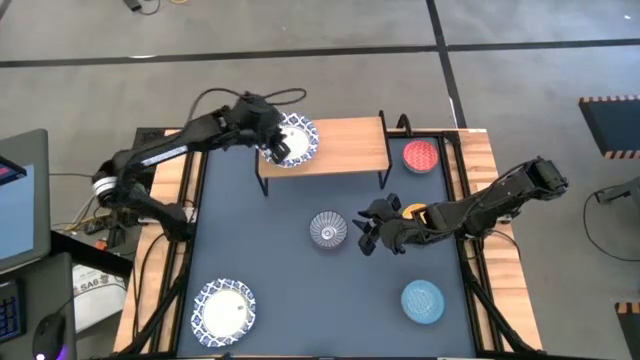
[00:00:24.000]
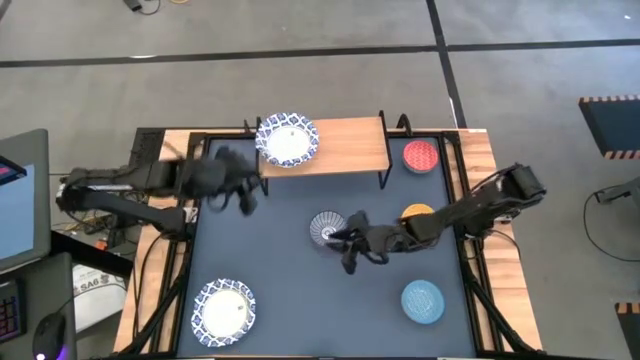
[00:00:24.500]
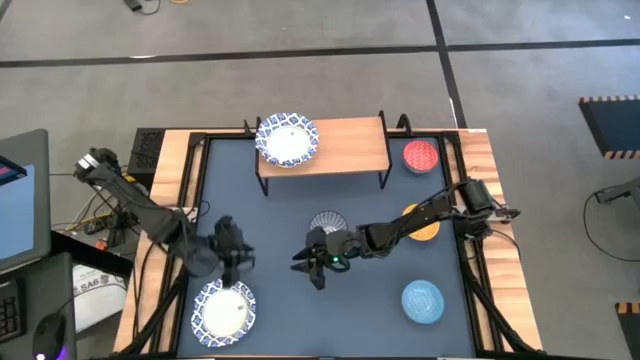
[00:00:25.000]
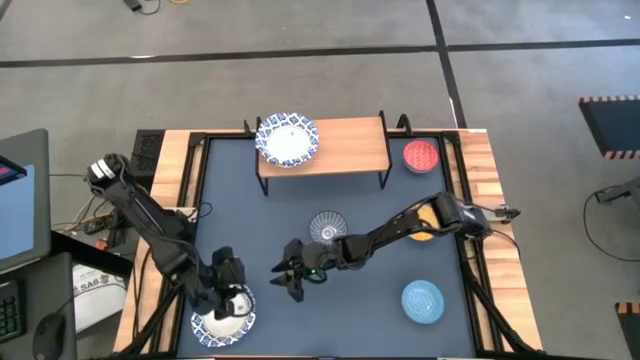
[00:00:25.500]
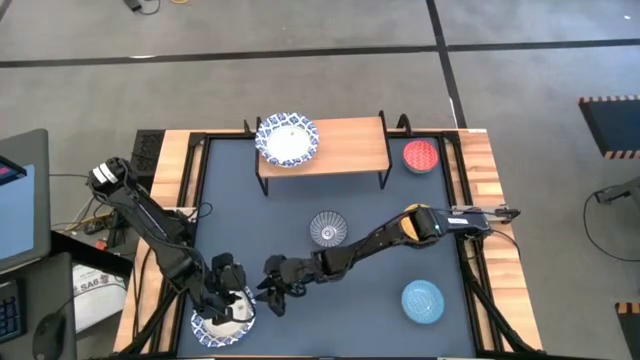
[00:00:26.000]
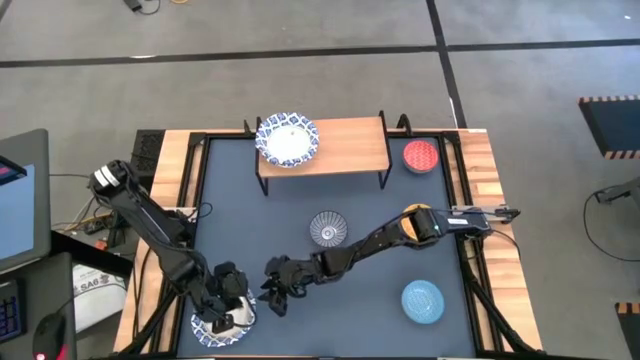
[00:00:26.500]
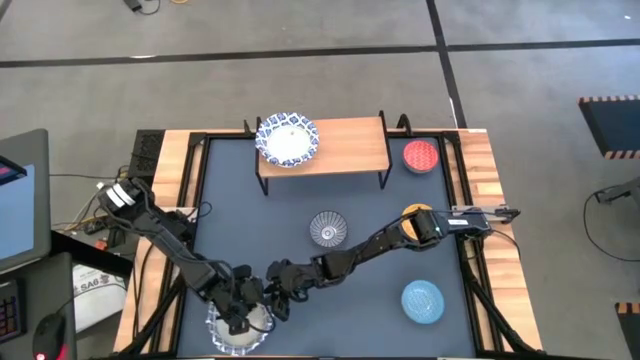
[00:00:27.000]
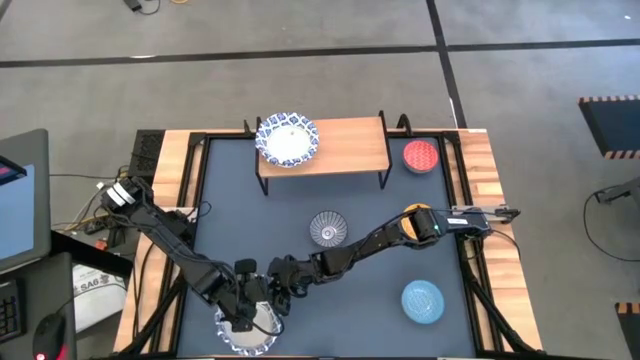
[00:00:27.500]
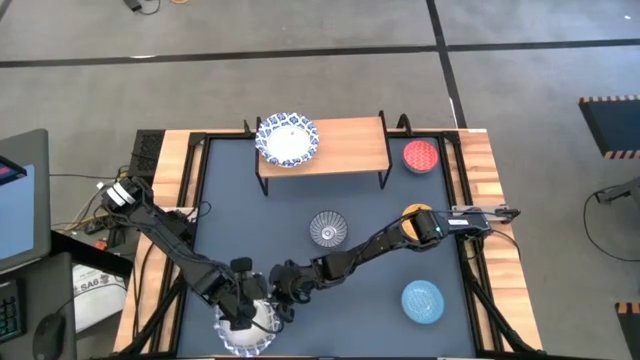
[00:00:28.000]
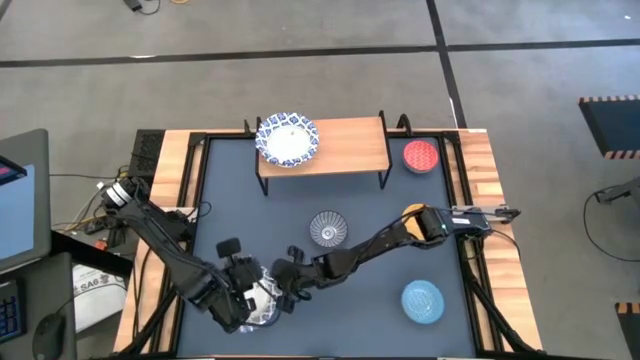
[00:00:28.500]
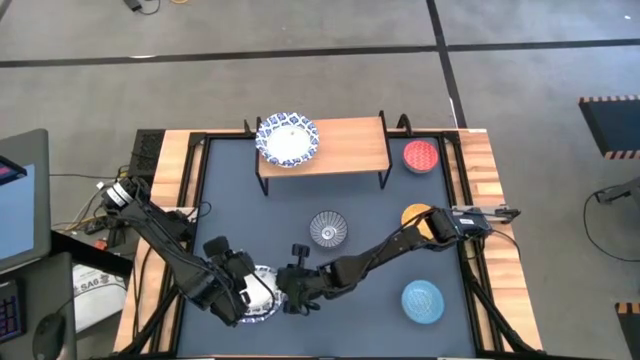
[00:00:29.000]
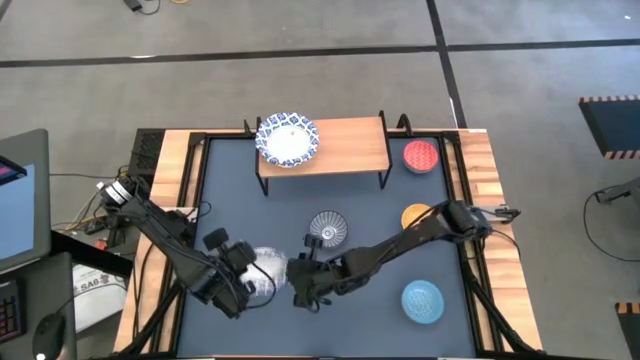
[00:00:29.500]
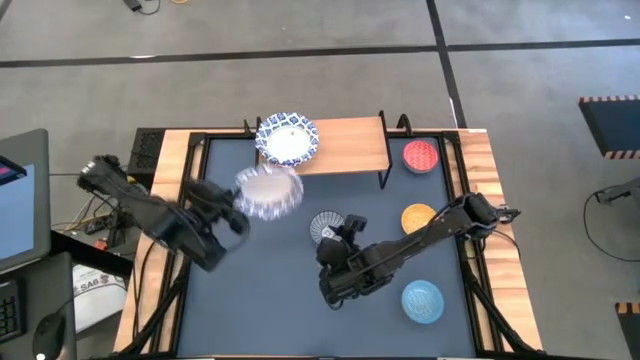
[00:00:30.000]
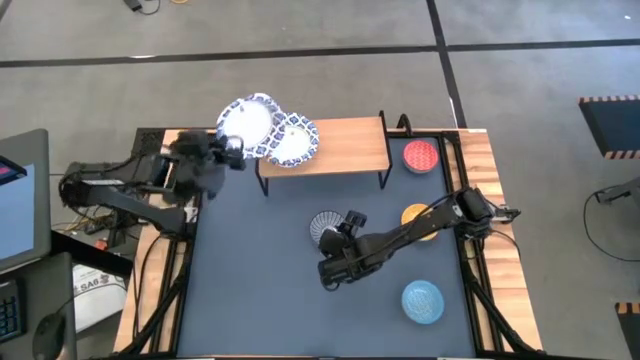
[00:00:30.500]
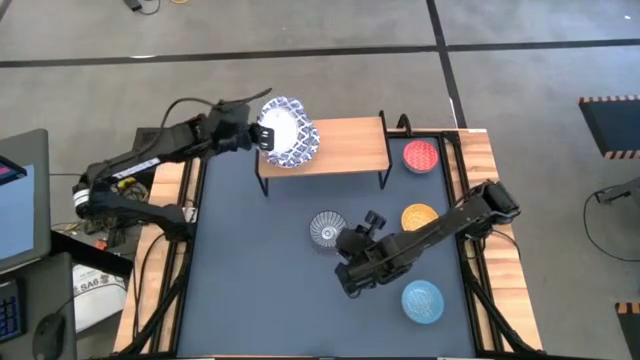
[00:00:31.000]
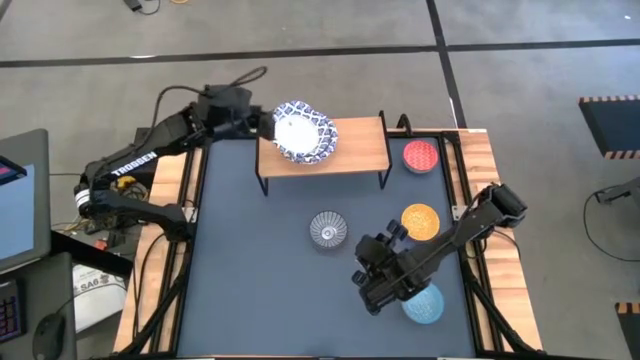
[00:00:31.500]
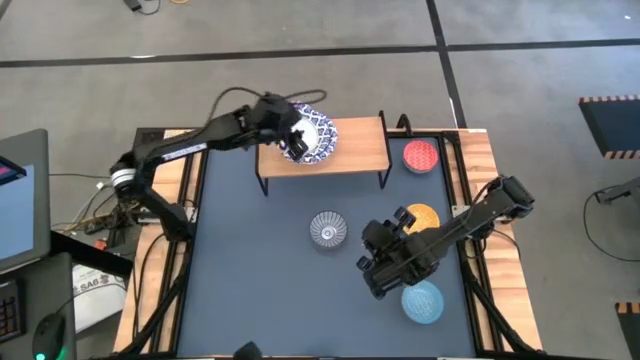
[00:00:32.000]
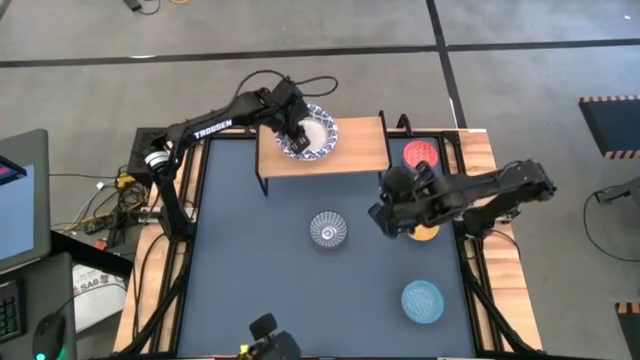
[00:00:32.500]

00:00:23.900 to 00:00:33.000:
Task: Place and stack bowls onto a shelf
Stack the white patterned bowl on top of the white patterned bowl on the shelf

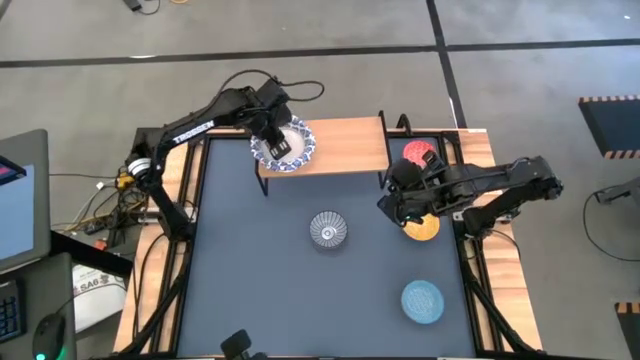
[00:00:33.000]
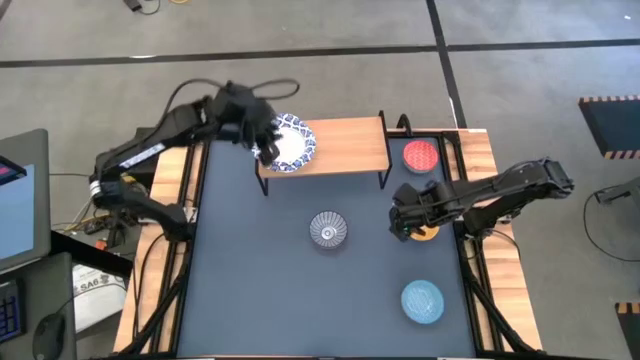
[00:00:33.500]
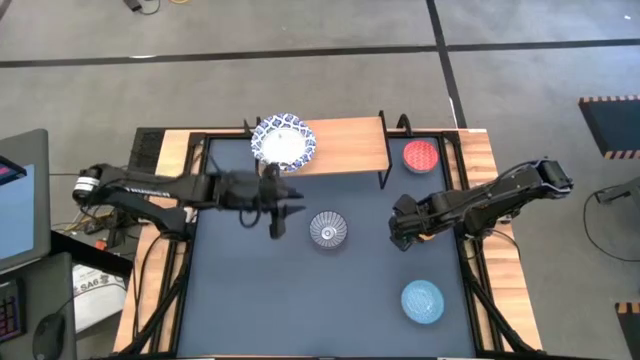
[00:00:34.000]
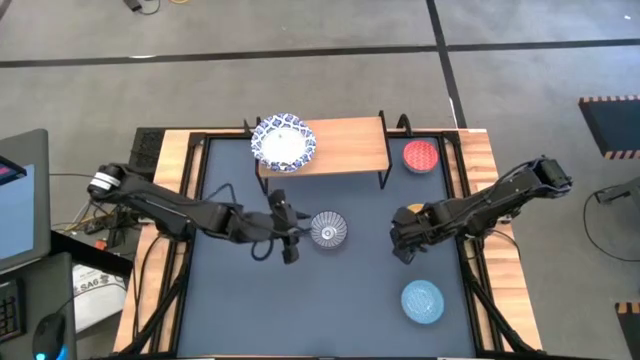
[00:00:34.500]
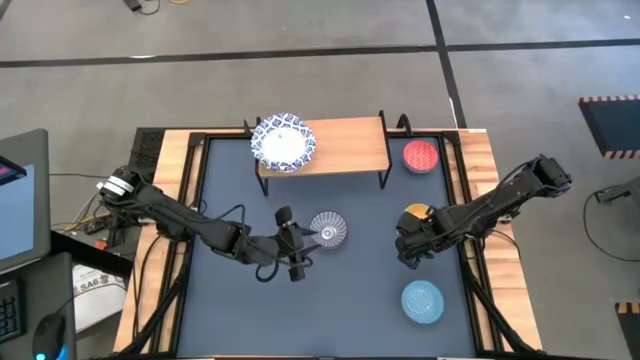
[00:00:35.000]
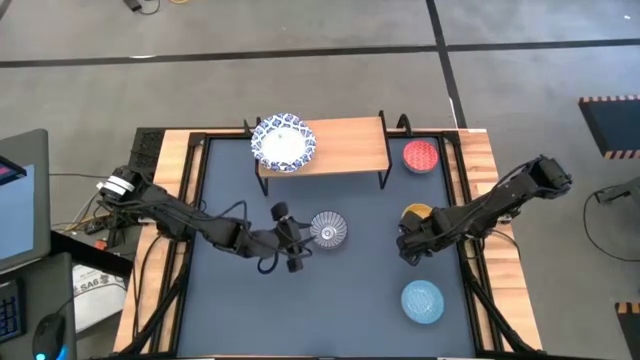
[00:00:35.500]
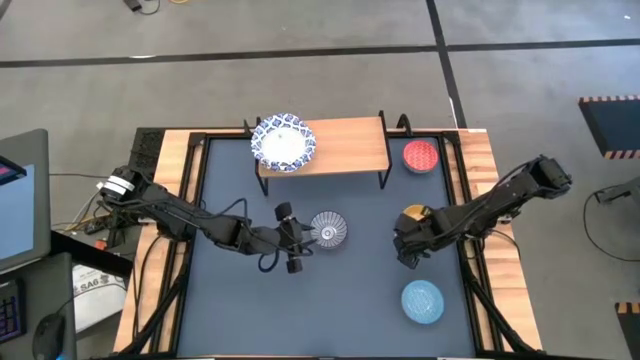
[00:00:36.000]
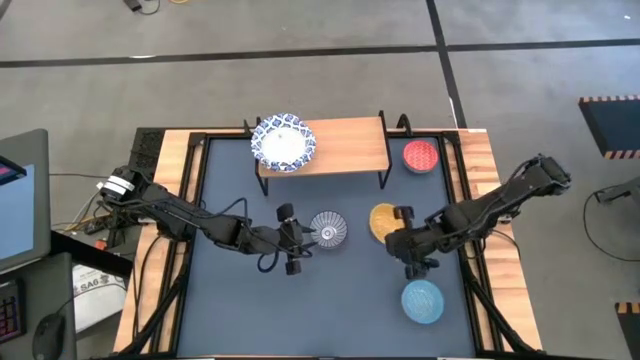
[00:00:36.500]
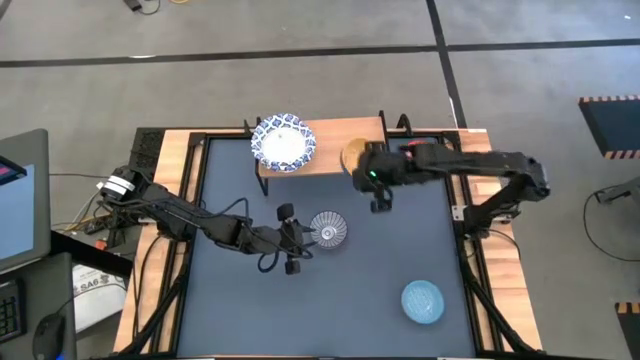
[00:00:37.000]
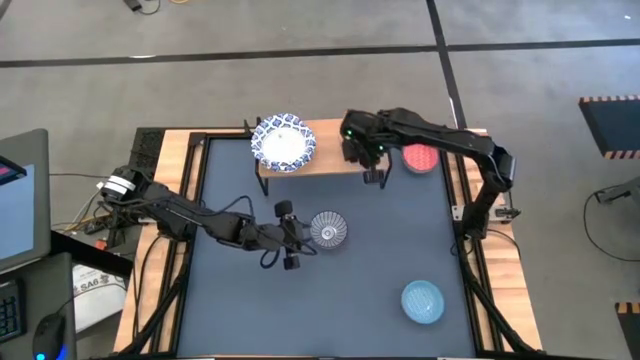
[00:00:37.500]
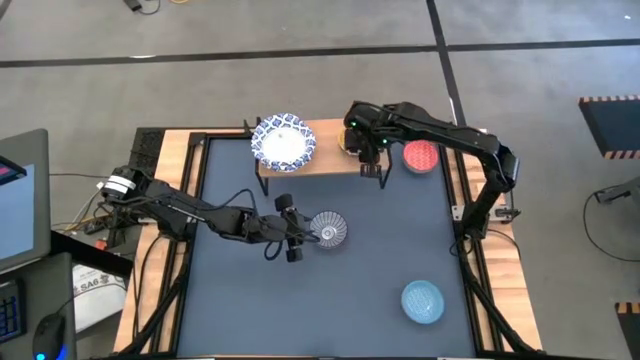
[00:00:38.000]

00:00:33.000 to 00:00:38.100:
Put the yellow patterned bowl on the shelf

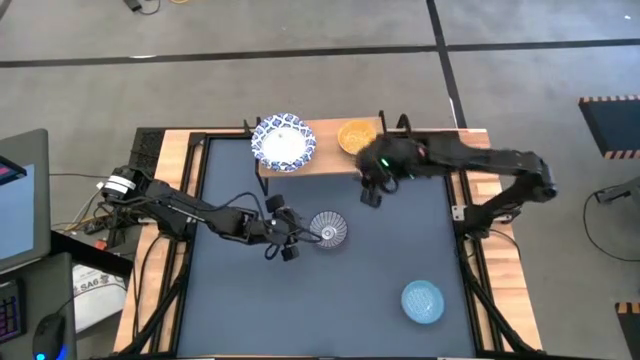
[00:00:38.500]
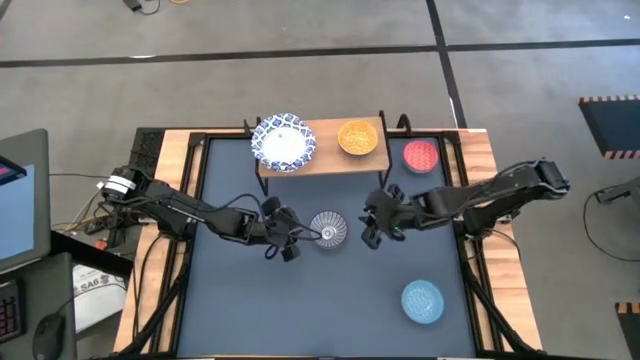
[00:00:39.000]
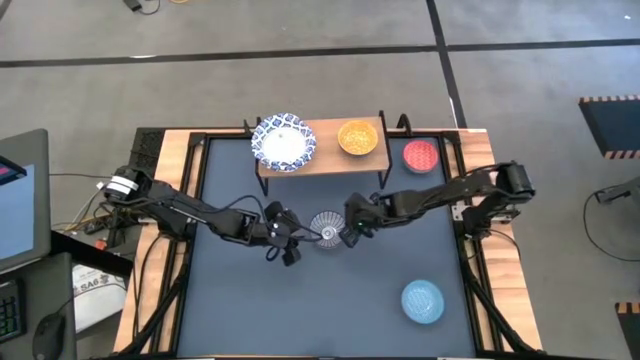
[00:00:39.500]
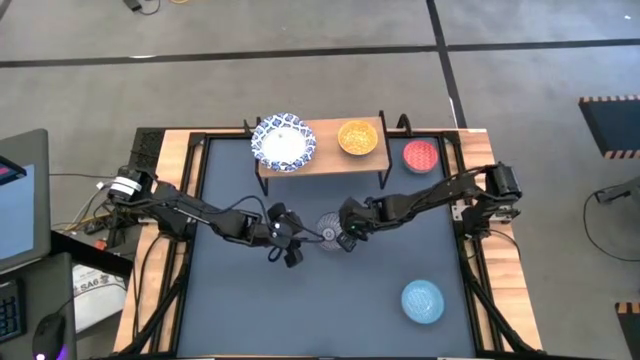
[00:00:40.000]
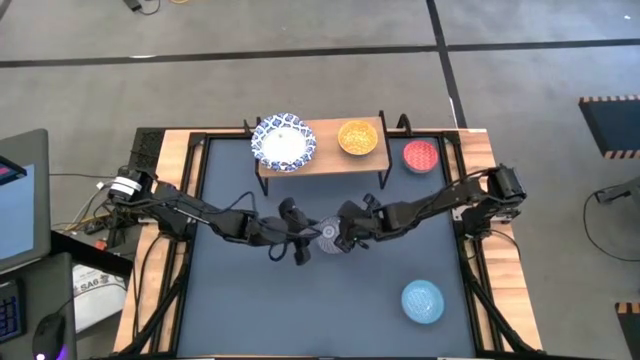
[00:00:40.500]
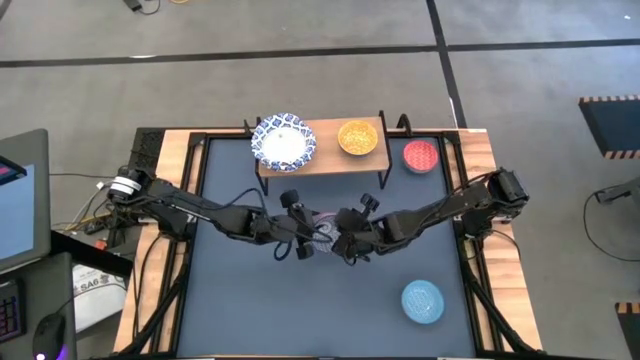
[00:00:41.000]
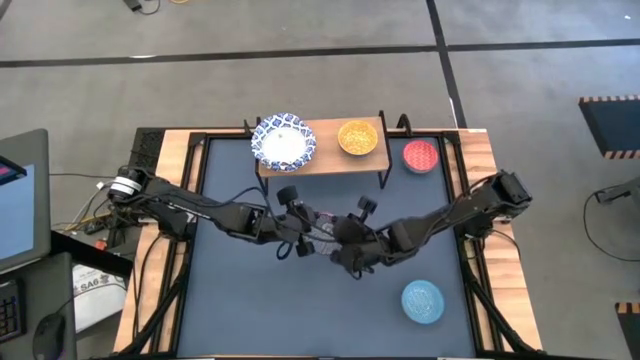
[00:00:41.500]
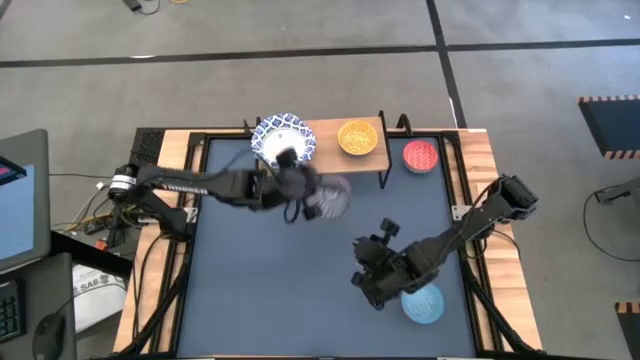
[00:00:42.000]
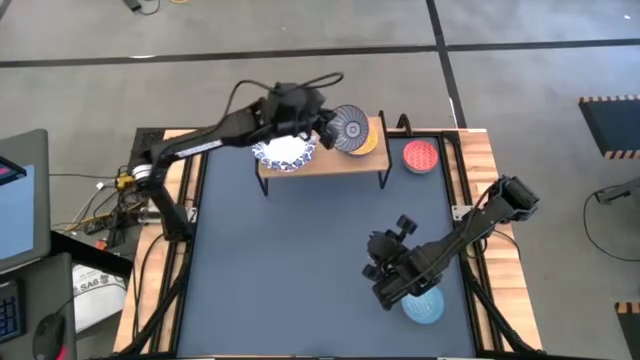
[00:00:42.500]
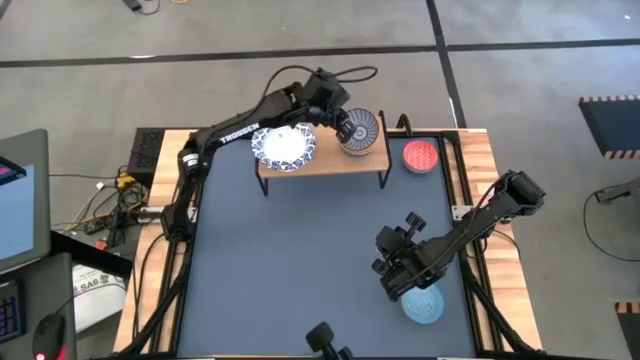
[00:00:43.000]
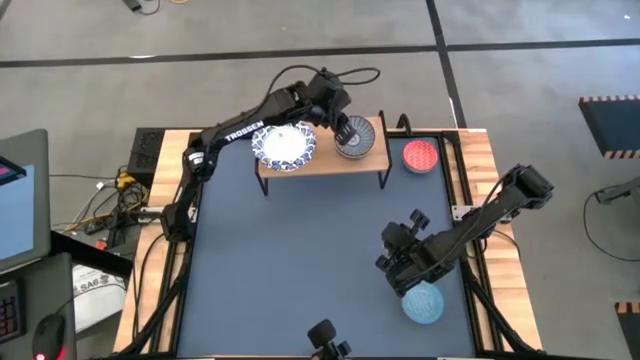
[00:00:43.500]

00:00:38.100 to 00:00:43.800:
Stack the blue patterned bowl on top of the yellow patterned bowl on the shelf

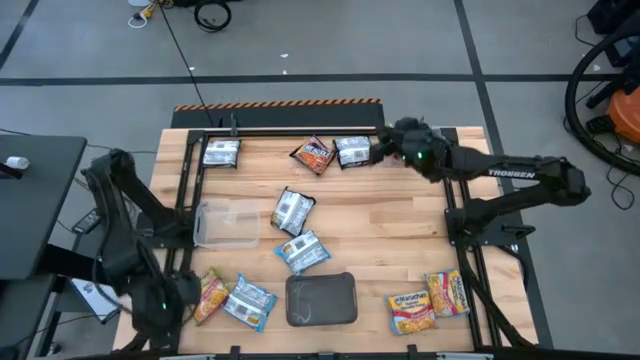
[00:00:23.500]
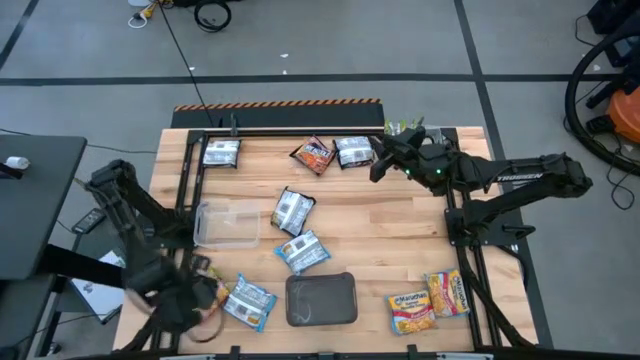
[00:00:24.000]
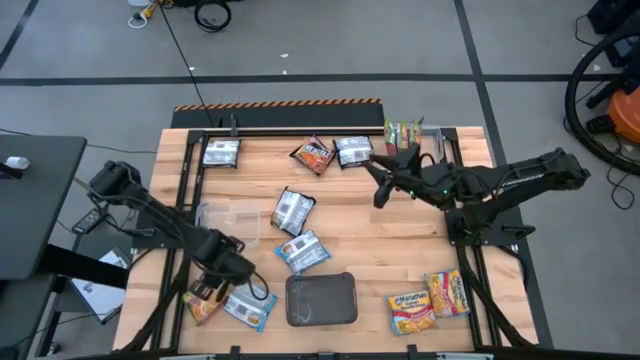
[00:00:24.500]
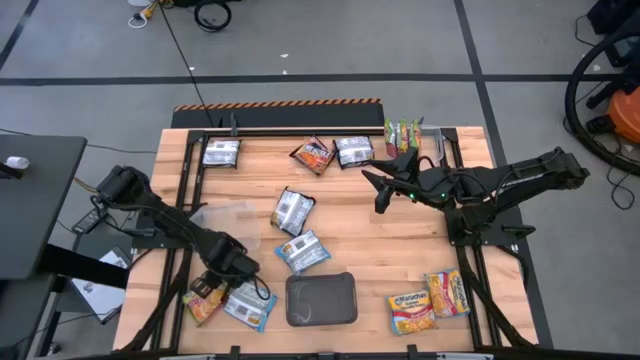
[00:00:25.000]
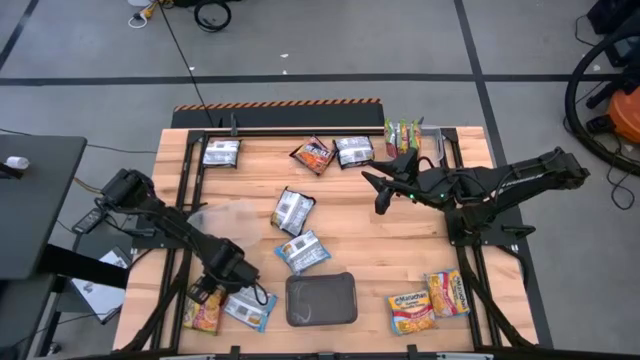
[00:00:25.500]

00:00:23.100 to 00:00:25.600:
Task: Sort Maruchan noodles
Put the green noodle pack into the top transparent bin
